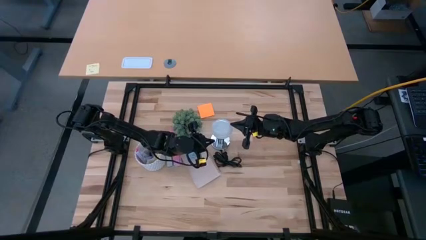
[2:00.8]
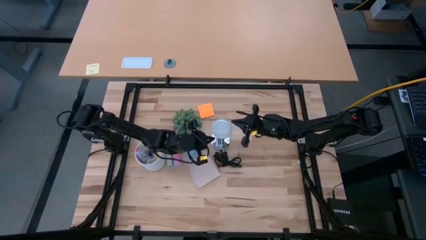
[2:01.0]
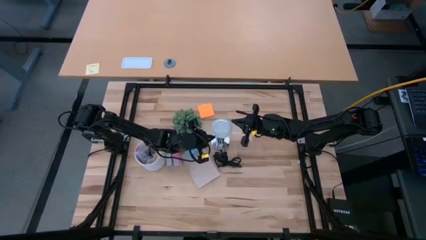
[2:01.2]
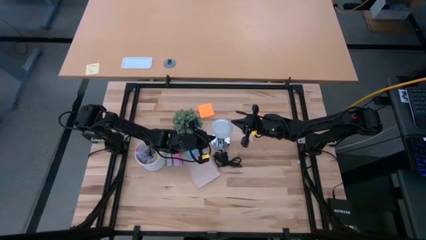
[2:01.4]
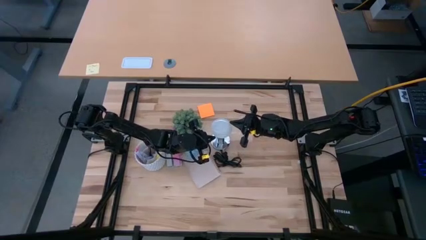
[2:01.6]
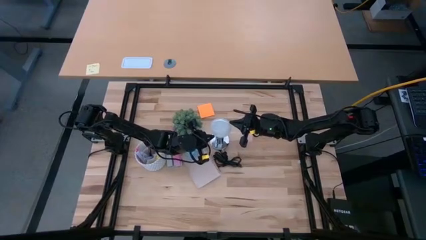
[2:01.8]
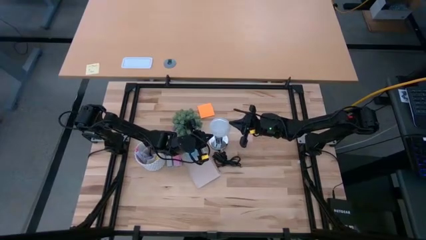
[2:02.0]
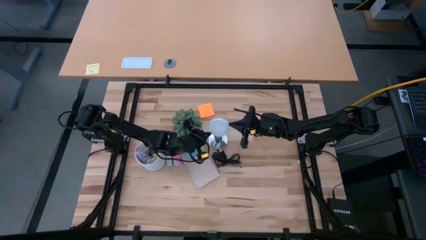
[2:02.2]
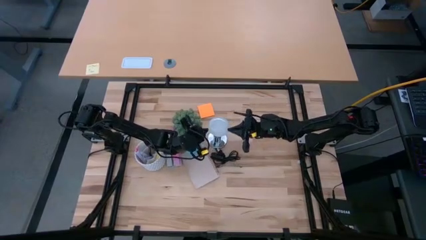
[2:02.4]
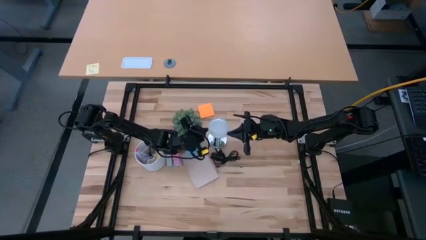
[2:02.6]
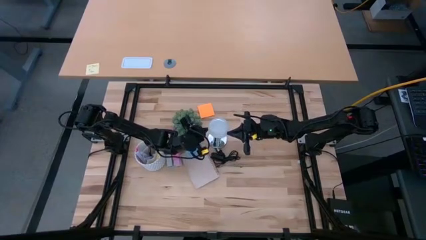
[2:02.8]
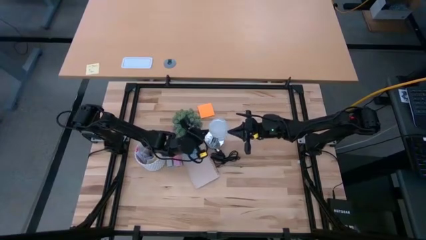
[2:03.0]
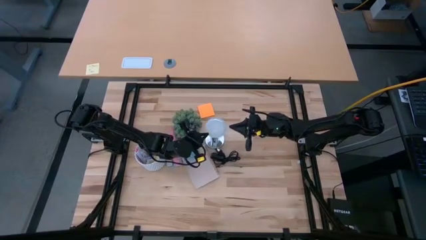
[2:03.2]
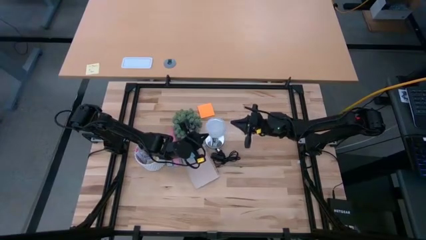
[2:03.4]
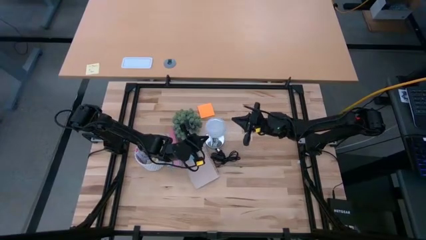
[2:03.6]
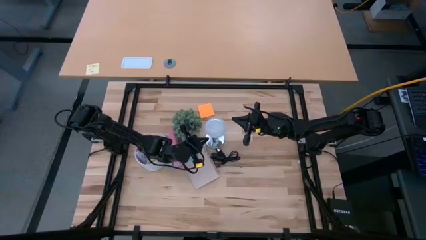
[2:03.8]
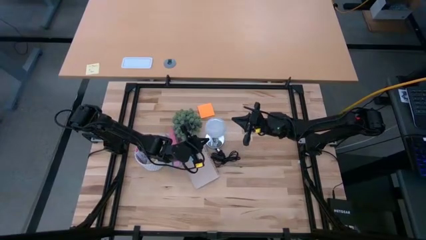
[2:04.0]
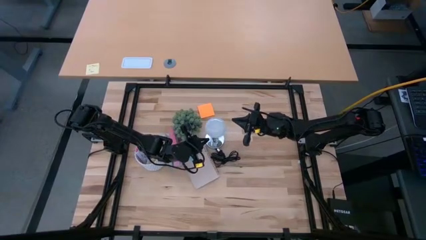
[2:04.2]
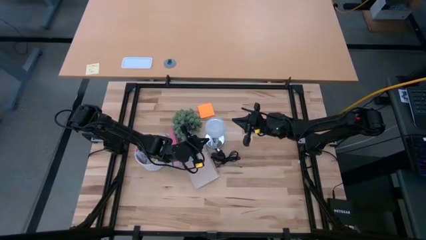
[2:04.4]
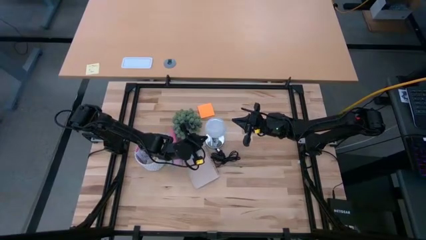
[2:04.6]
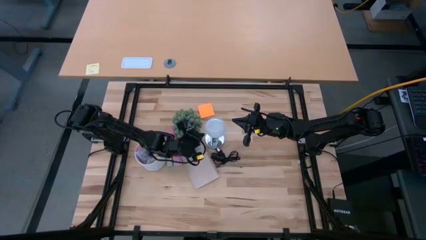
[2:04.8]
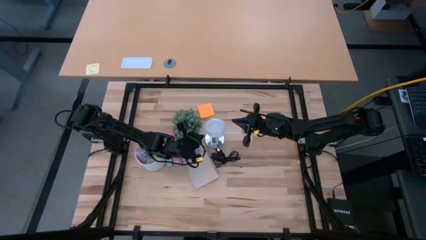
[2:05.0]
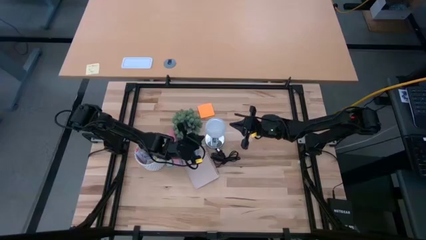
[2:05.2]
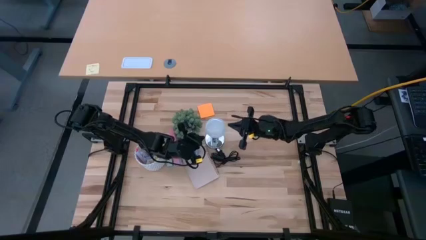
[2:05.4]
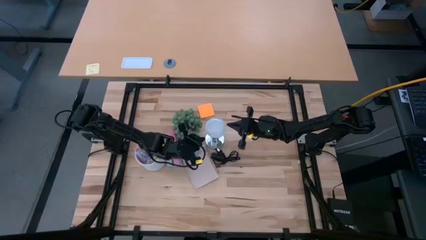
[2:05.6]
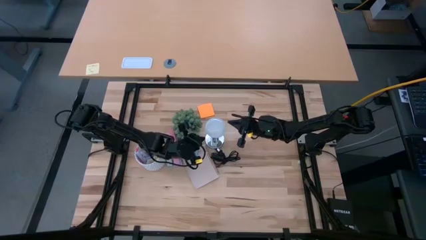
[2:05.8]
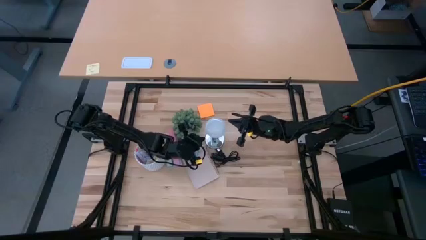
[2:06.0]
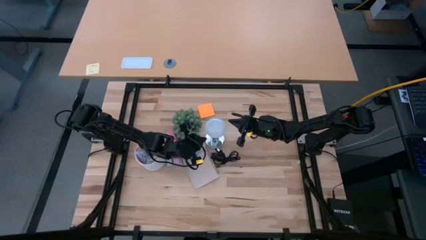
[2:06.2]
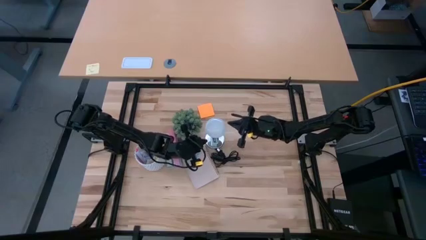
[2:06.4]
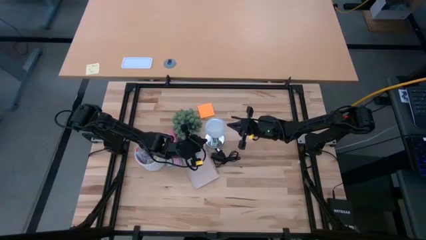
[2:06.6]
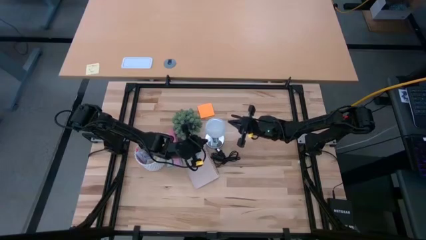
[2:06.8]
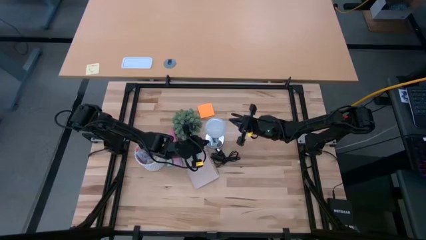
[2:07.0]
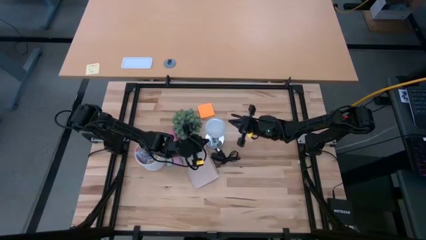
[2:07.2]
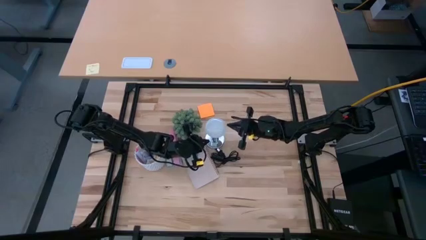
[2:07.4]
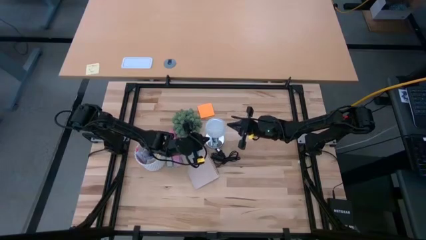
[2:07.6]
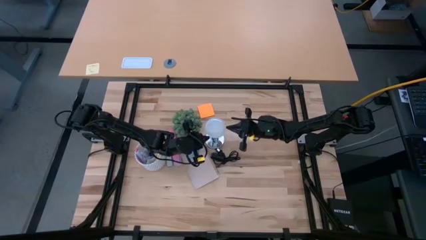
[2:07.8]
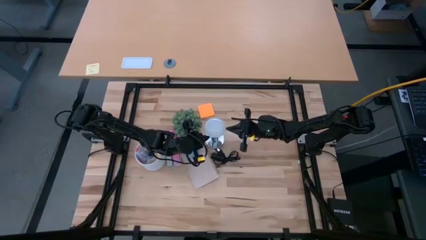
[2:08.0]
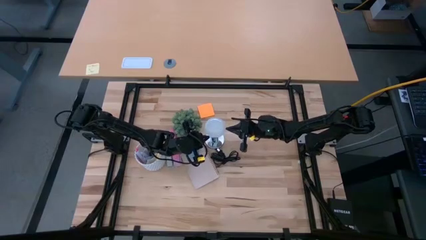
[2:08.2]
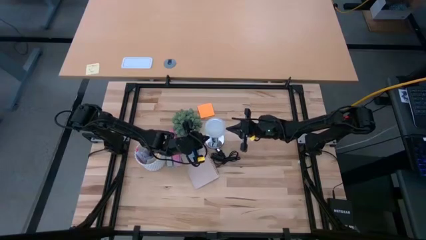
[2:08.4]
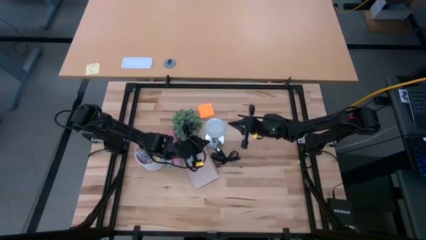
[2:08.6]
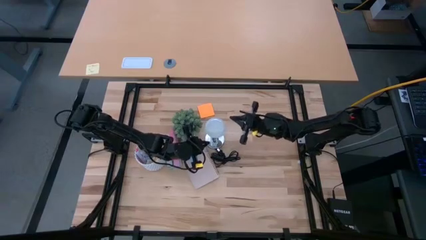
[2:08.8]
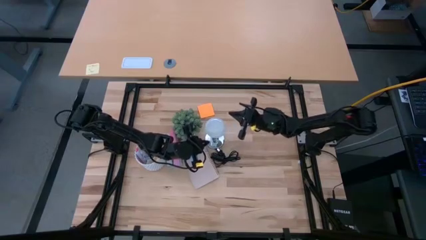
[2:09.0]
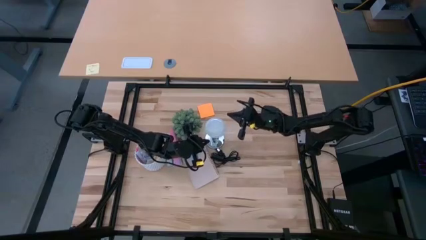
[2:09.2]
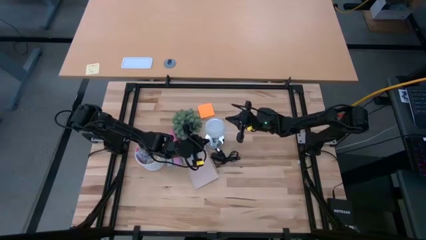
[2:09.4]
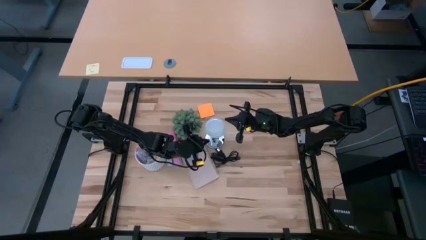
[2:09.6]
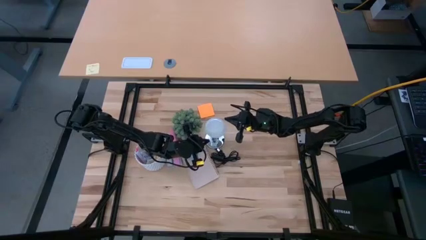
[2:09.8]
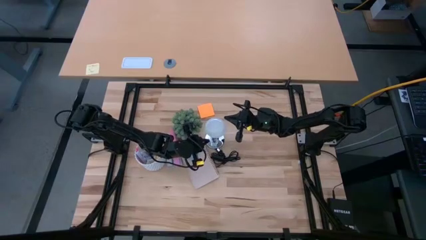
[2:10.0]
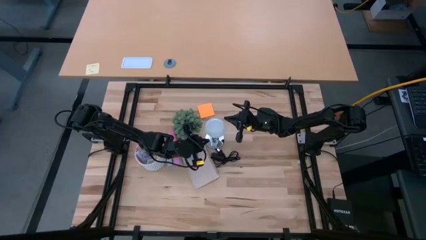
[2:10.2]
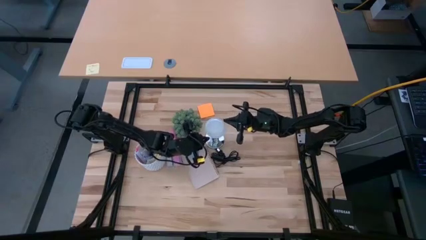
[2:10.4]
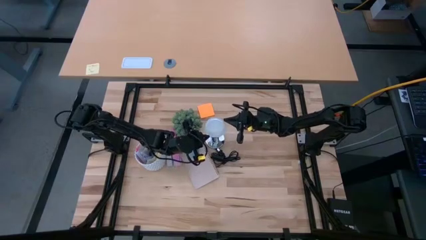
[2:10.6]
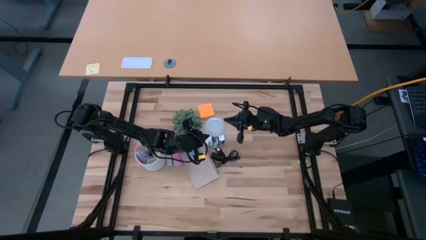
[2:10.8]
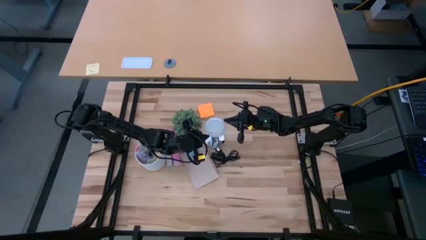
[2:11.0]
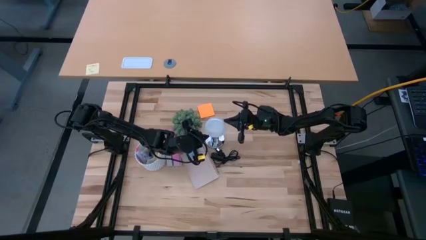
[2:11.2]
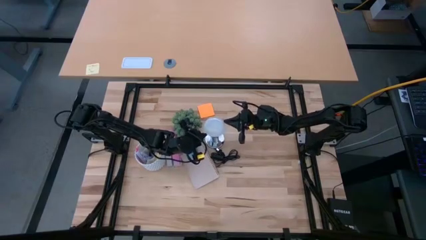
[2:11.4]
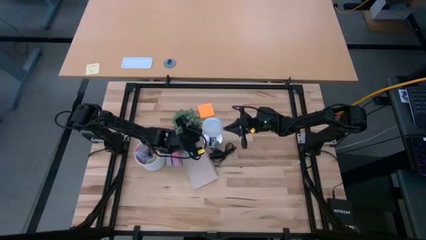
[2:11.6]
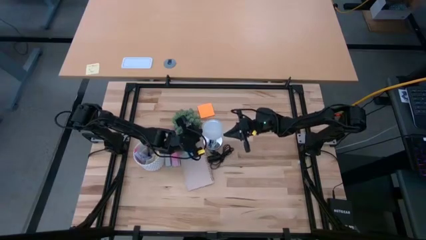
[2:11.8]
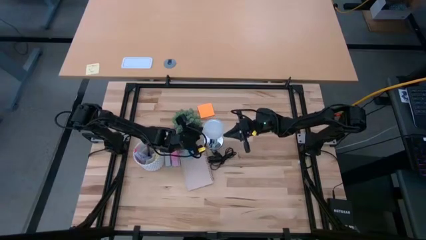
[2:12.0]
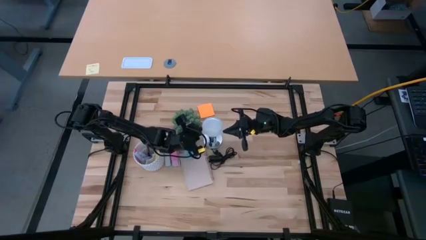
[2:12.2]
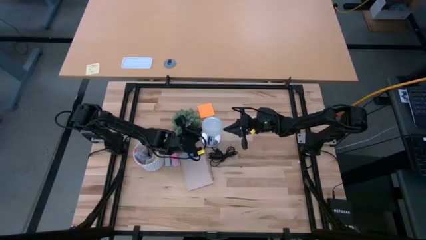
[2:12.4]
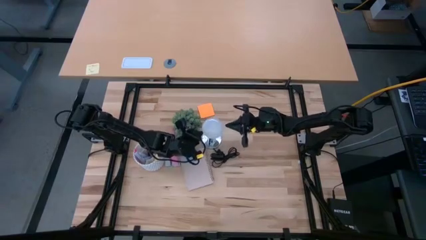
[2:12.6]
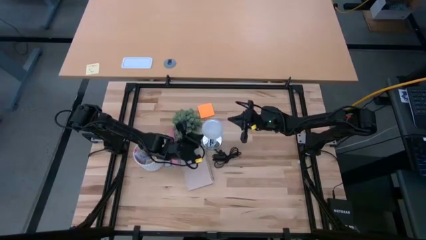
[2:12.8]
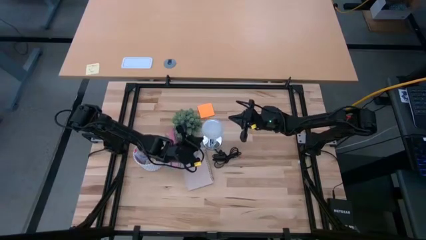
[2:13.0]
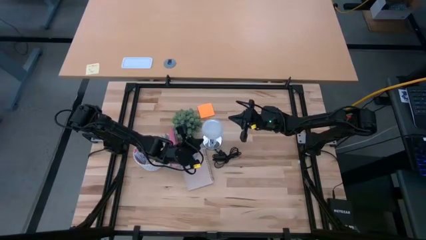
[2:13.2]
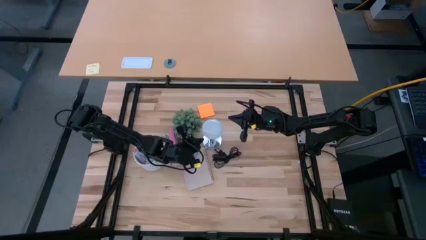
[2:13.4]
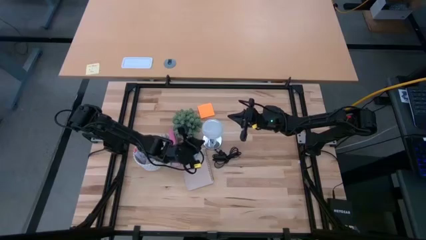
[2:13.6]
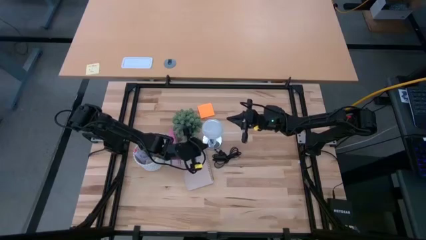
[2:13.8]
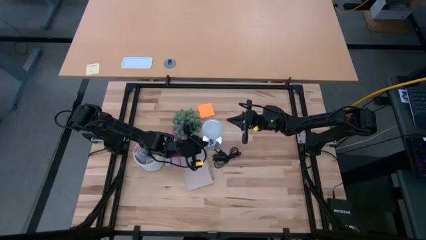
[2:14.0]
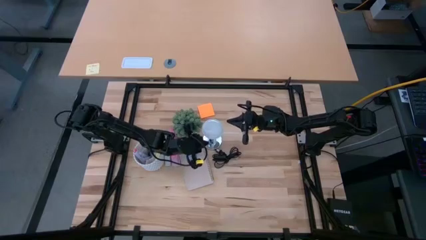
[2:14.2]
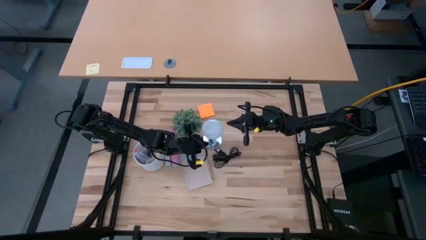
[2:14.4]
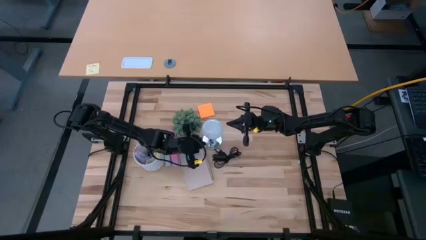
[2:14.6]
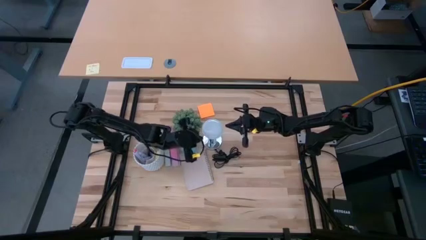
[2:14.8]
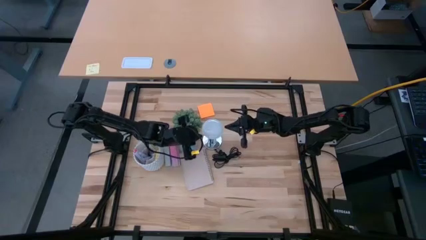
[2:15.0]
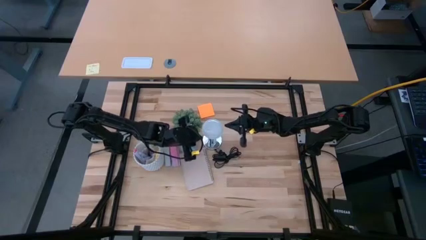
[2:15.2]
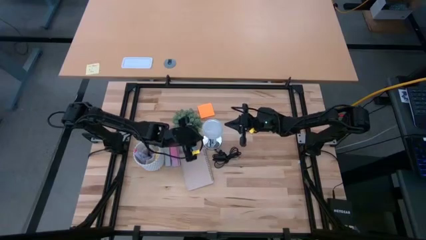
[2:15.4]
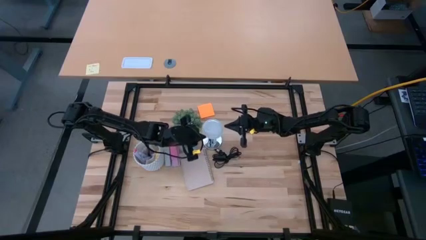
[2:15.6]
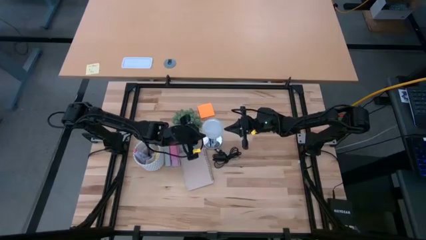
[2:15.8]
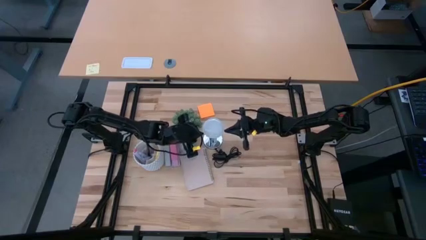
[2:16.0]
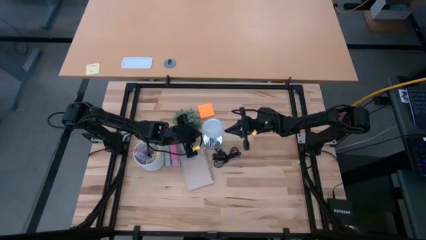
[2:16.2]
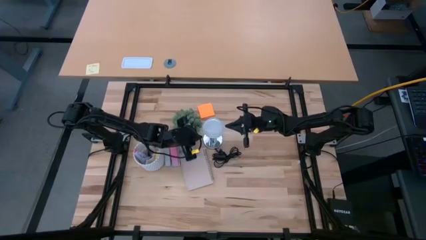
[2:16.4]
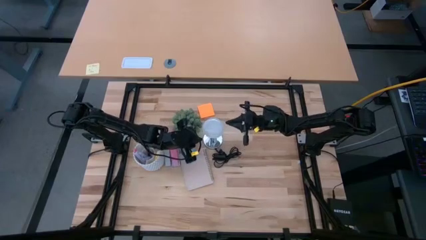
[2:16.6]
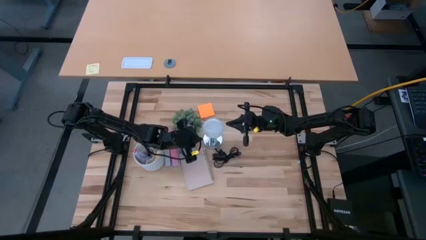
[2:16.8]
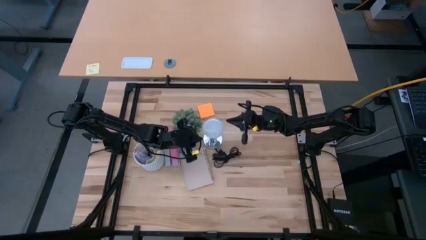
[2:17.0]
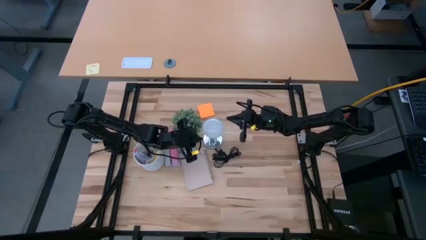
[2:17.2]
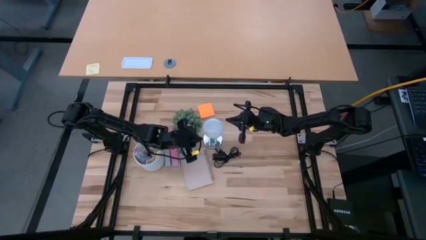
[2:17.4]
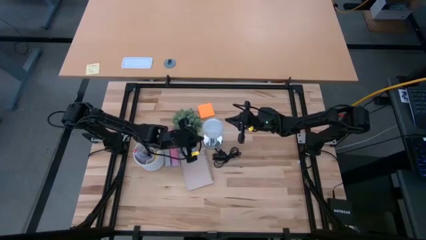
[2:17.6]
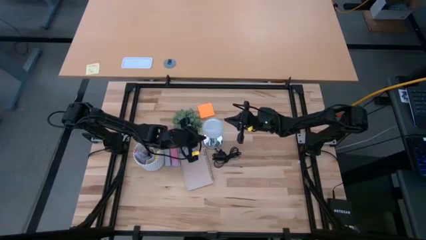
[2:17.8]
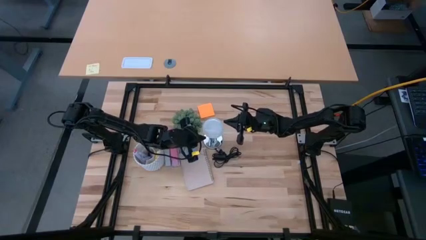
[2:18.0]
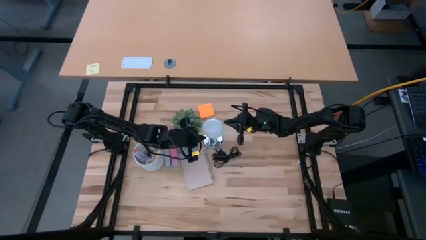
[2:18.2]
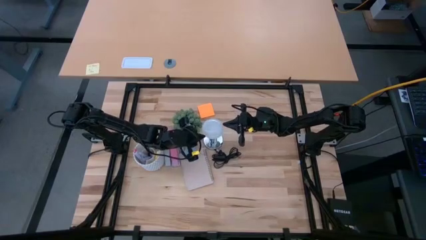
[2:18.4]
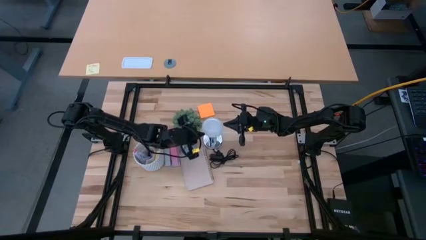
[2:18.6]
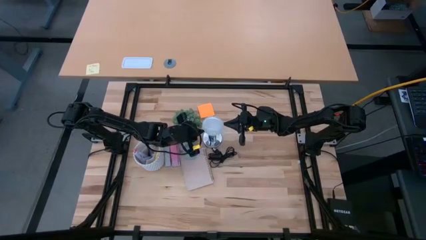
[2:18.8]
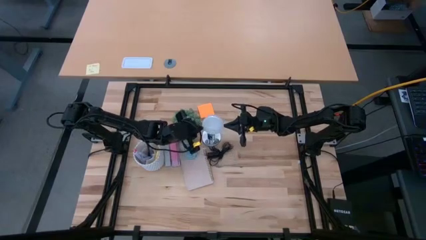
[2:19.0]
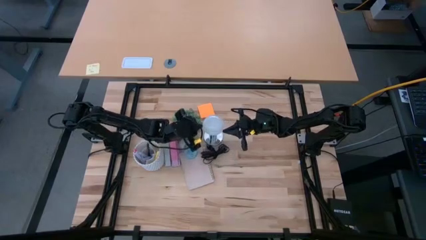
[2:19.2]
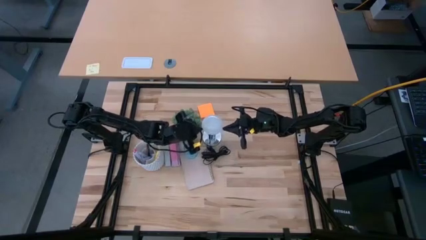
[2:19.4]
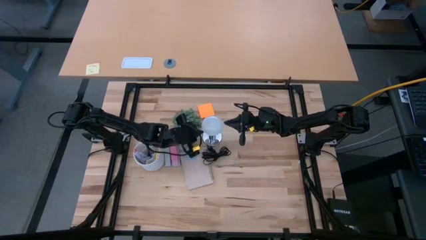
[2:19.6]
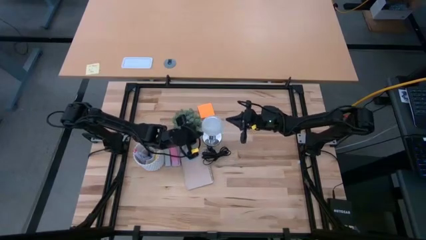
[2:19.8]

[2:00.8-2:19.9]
Task: Screw lightbulb
Insert the lightbulb into the silver lamp socket
